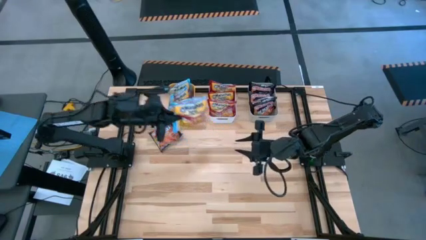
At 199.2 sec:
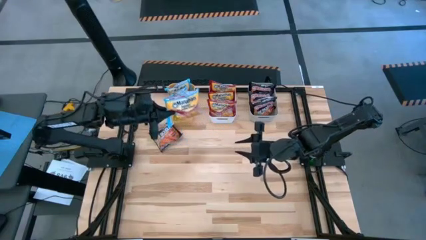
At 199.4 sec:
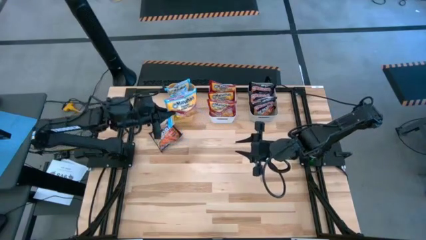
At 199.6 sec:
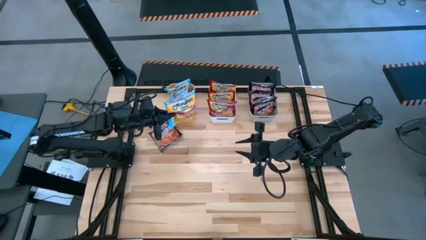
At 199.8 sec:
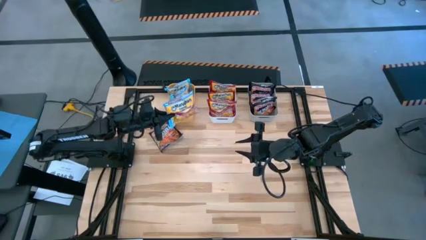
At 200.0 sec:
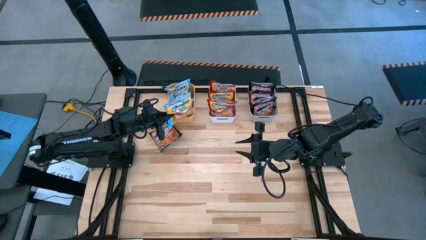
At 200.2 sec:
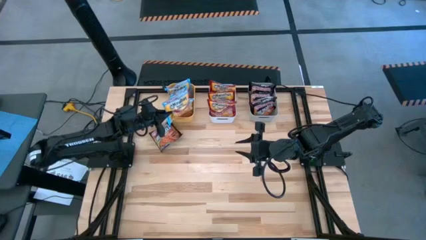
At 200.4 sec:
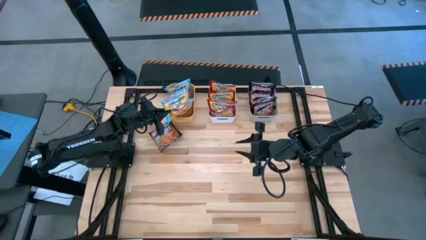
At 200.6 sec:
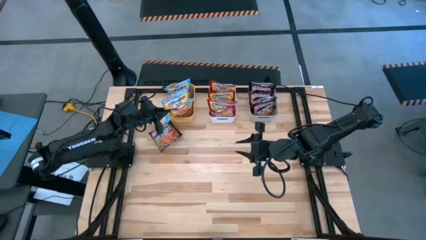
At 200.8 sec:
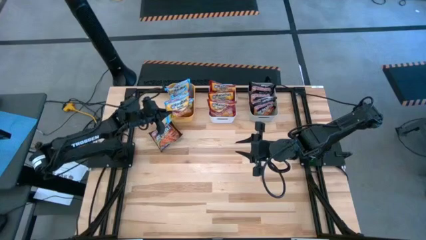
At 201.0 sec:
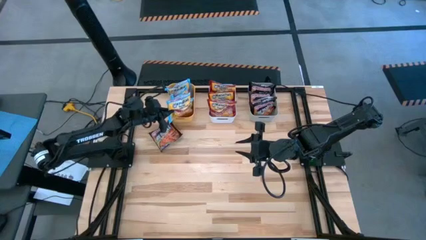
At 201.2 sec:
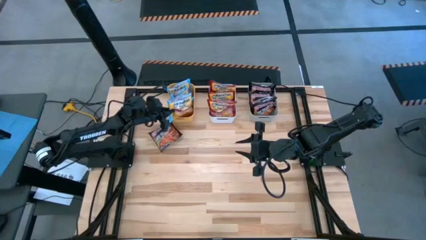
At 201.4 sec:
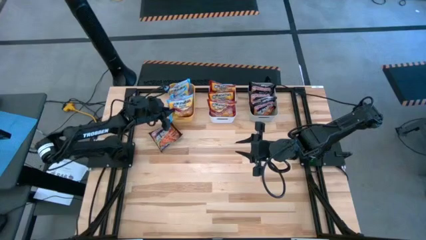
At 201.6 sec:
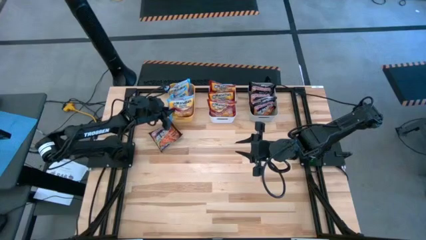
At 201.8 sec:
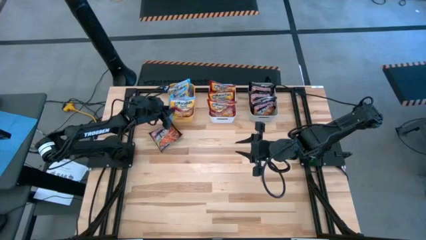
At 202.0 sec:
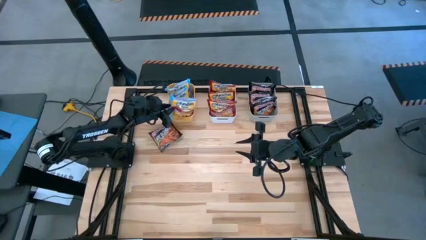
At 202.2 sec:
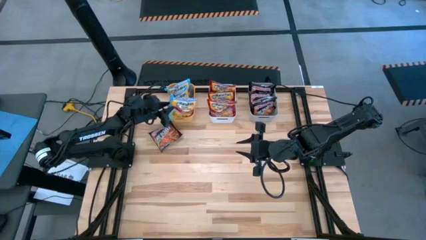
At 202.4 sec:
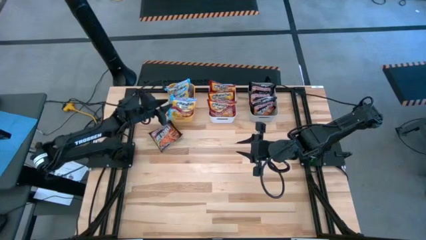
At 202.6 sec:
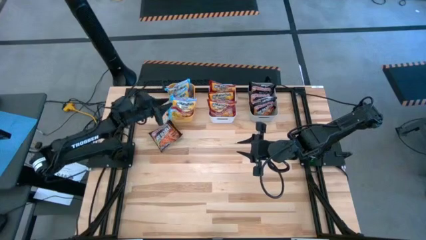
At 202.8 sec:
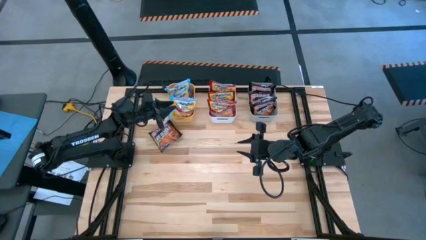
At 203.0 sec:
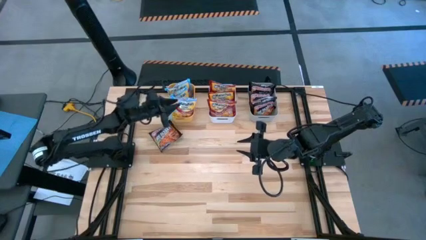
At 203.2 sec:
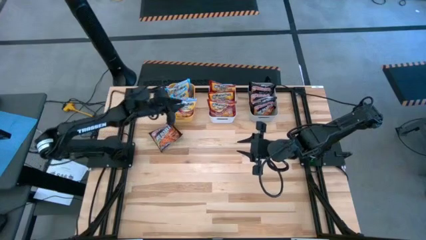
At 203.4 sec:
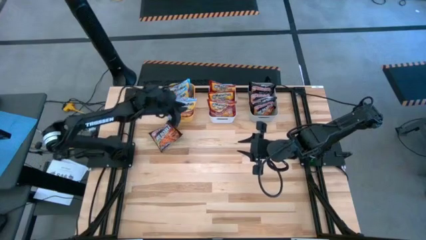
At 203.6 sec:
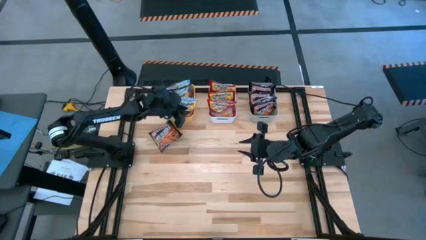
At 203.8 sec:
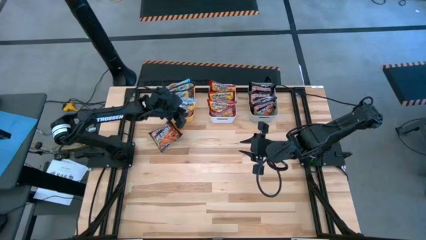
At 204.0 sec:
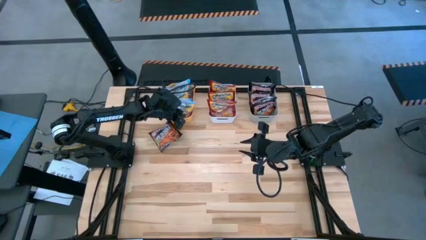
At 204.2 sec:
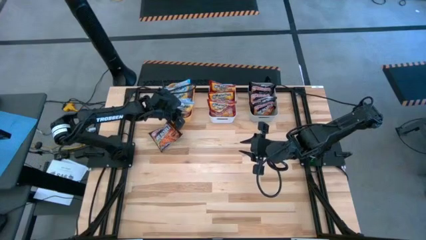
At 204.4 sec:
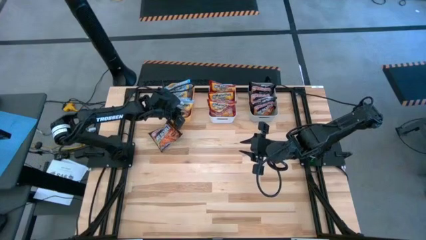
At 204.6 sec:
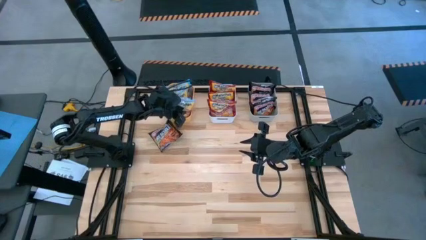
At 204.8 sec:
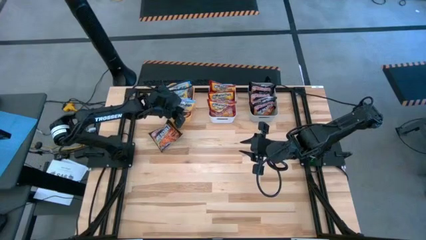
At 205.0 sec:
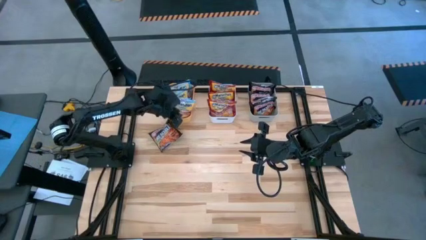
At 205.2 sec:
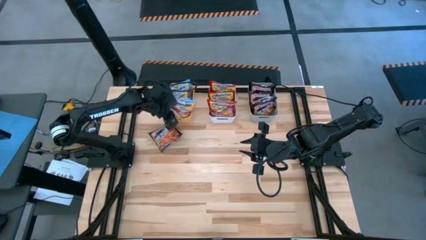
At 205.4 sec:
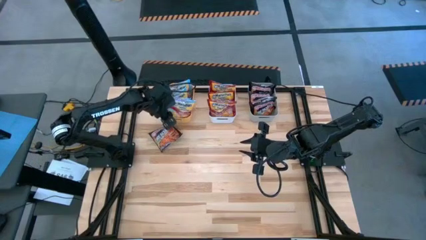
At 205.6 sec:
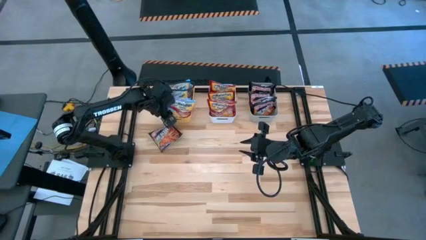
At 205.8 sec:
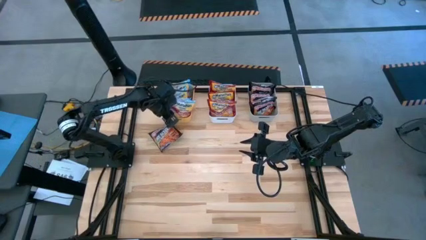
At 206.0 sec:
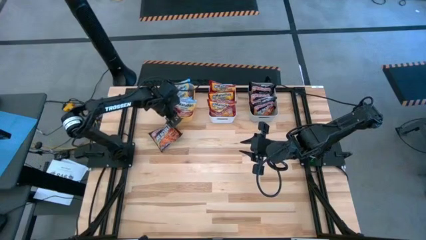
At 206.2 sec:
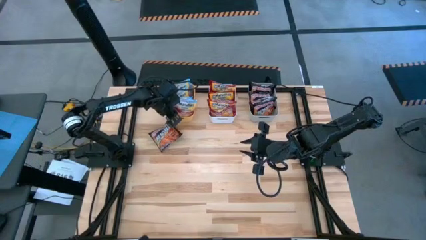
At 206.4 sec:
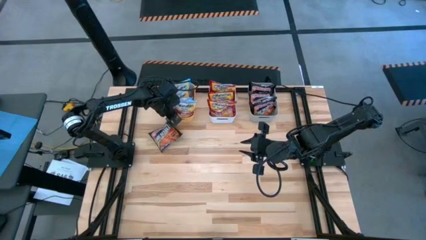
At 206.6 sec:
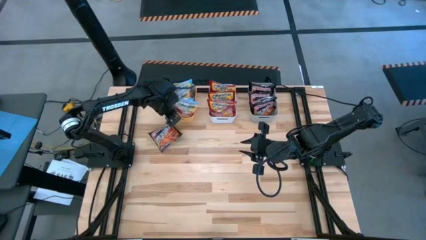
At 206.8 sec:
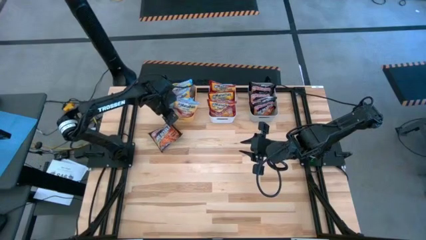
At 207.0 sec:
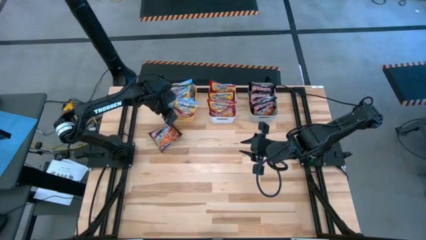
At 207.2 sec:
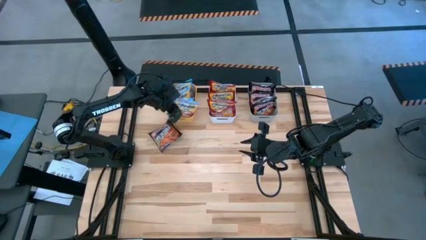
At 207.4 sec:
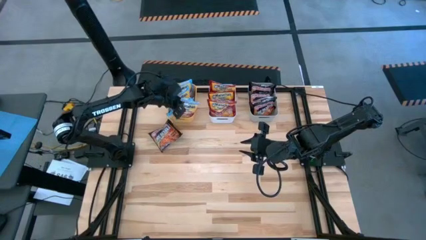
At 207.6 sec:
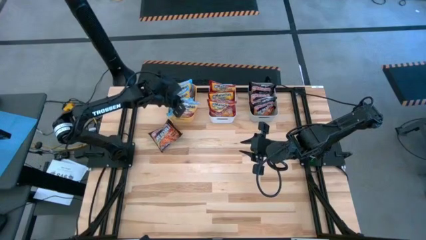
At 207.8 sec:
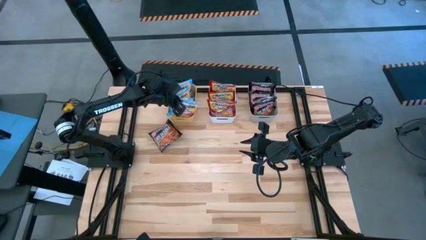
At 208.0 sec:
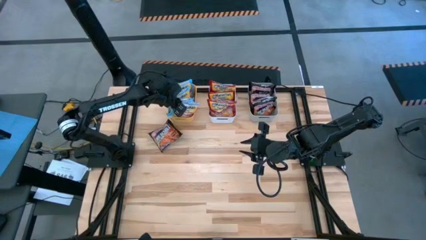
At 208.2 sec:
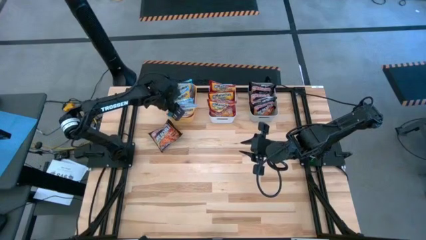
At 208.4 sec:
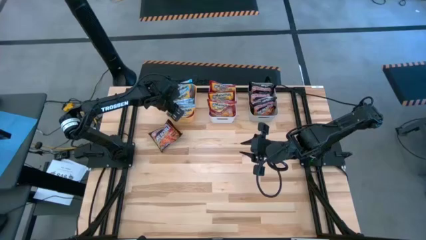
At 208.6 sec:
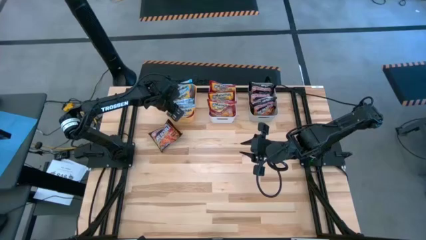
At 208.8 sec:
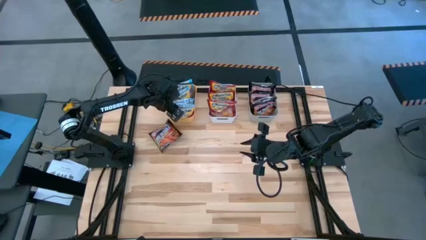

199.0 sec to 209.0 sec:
Task: Sort Maruchan noodles
Put the blue noodle pack into the orange bin

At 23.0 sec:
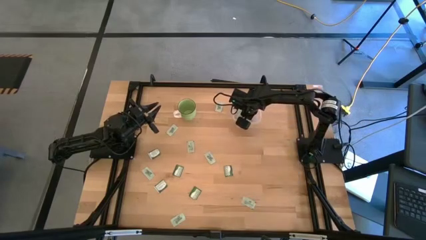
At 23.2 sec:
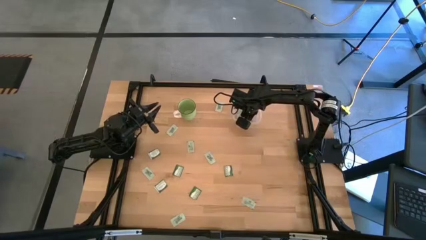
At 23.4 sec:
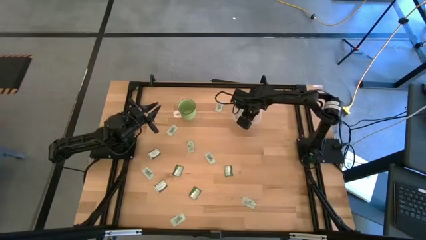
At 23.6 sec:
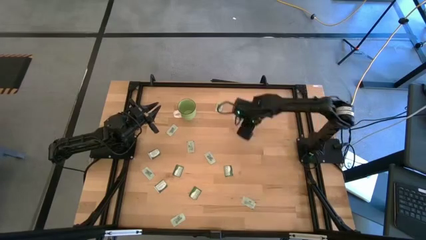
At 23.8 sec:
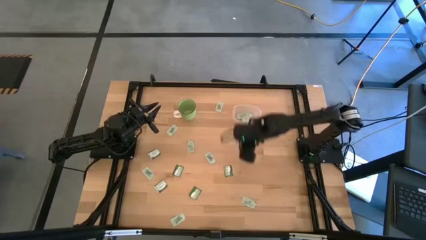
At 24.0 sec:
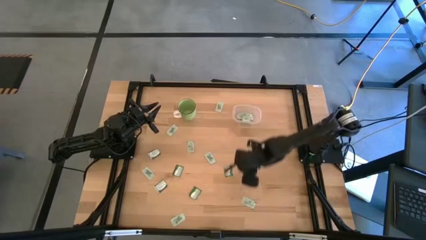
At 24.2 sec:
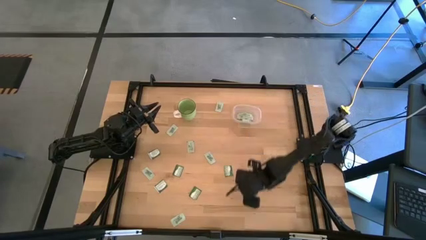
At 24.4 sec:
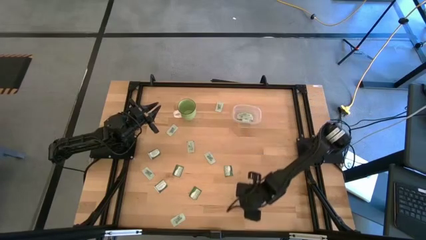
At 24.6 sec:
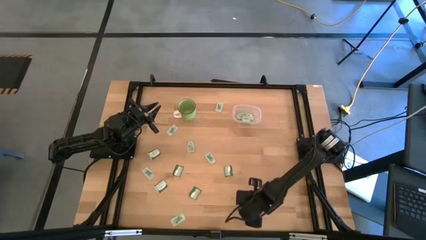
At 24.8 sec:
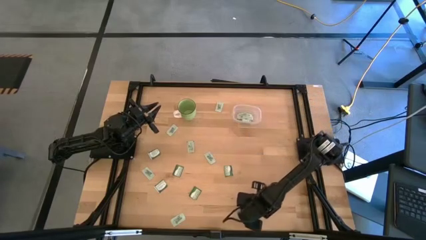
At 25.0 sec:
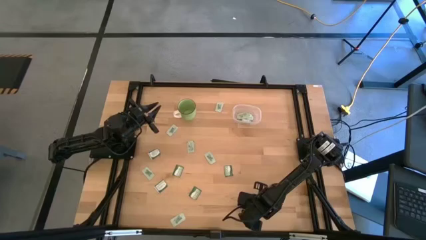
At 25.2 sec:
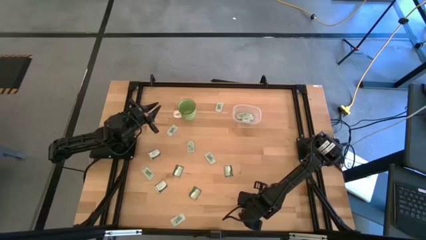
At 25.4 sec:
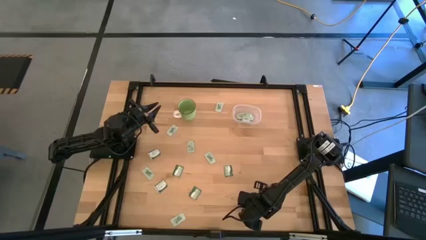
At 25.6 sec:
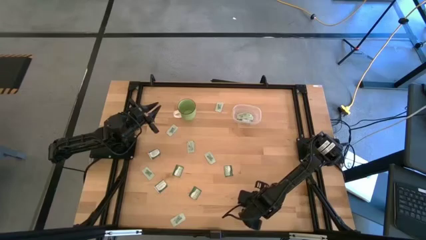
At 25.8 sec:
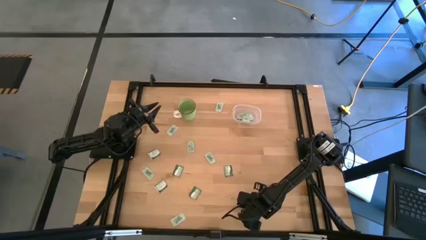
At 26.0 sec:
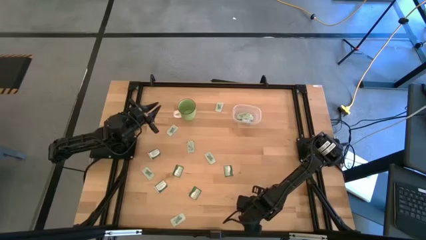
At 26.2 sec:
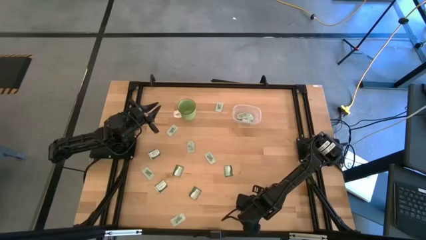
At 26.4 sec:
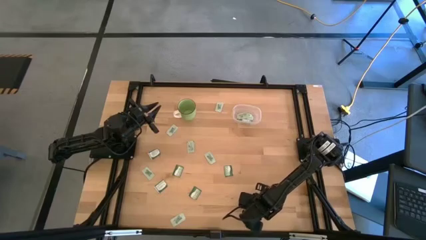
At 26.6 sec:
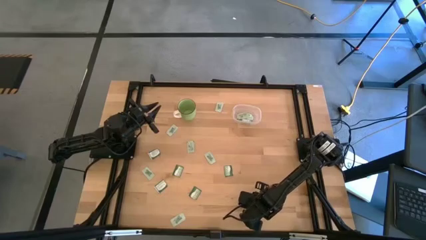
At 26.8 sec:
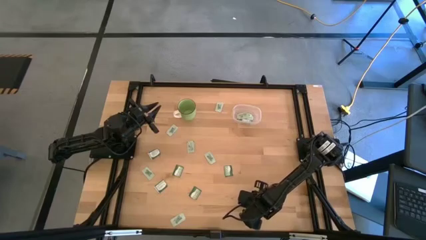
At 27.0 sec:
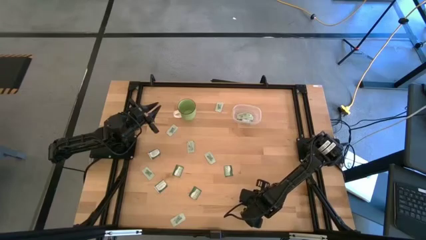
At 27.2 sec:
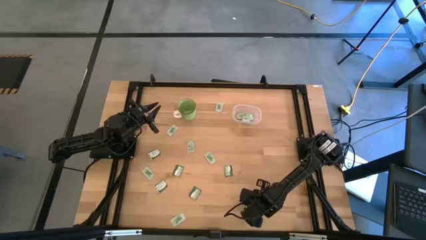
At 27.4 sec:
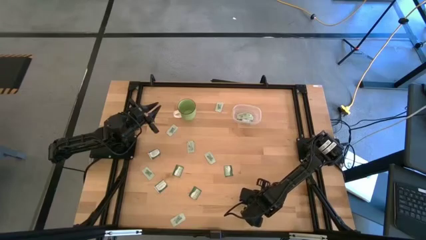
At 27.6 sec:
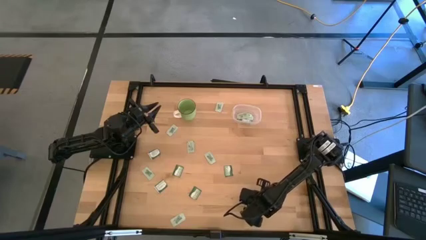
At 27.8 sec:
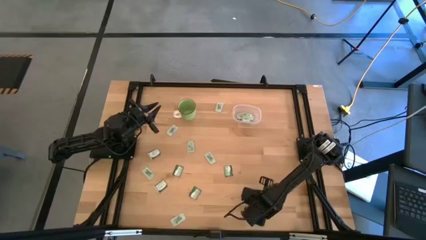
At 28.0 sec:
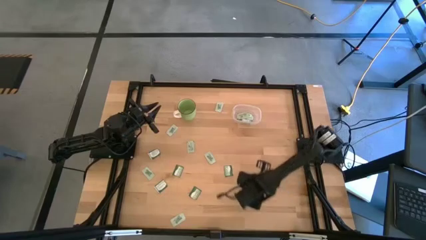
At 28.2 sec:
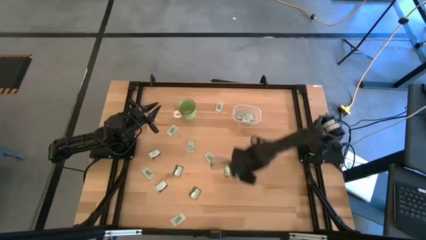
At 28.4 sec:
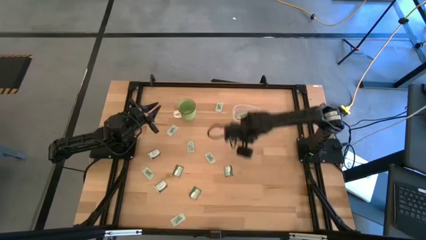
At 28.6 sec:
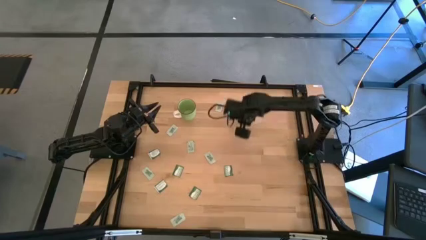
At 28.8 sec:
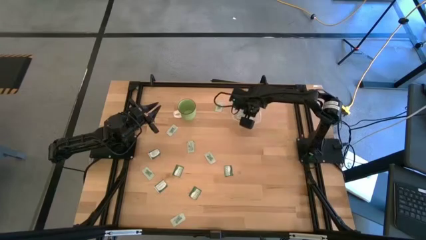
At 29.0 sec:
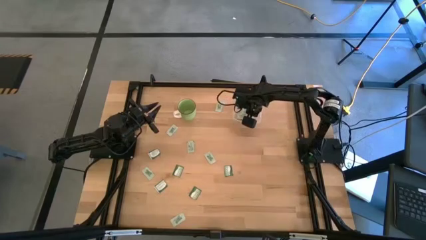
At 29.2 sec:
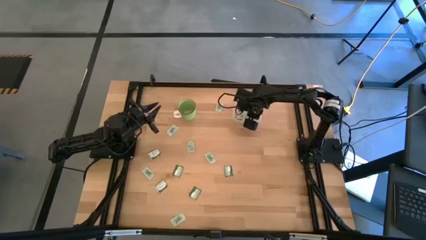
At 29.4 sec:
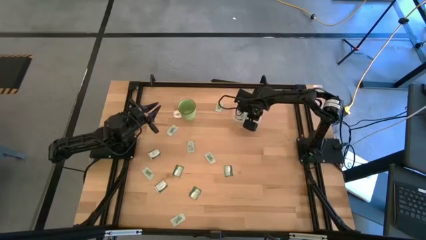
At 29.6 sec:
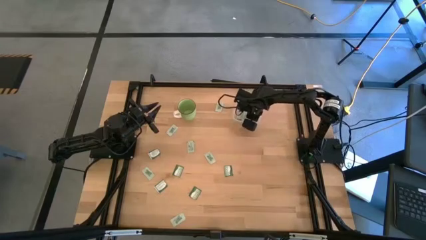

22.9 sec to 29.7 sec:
Task: Pick and place items into bin
Put the white stevia packet into the transparent bin
